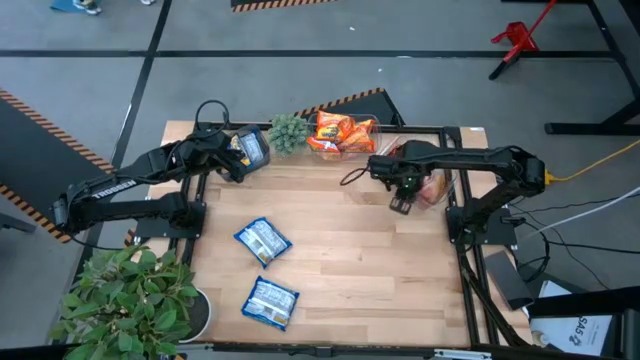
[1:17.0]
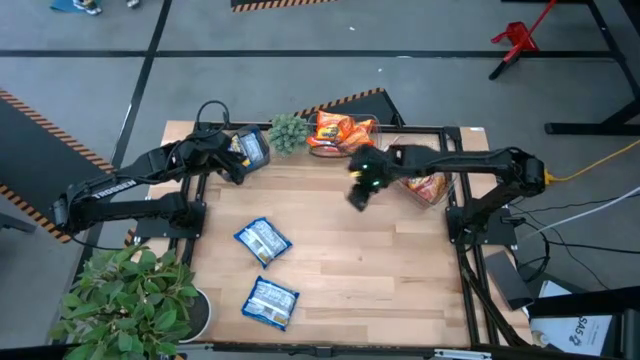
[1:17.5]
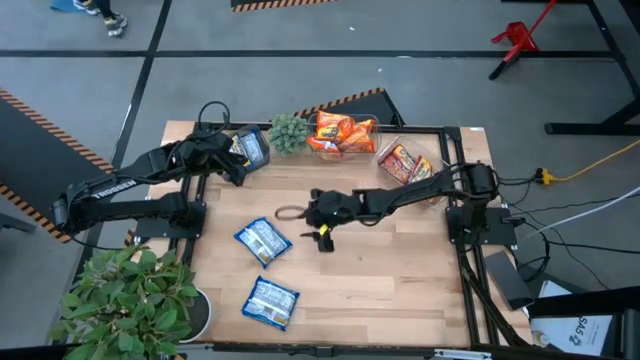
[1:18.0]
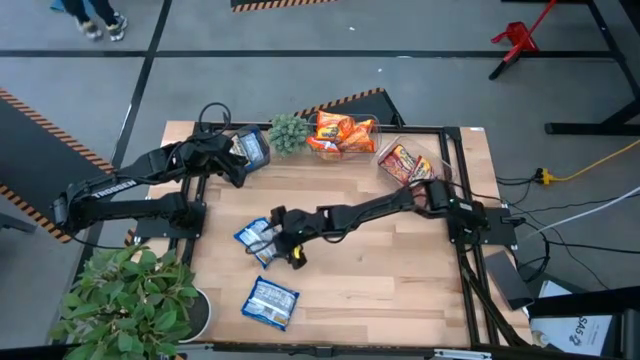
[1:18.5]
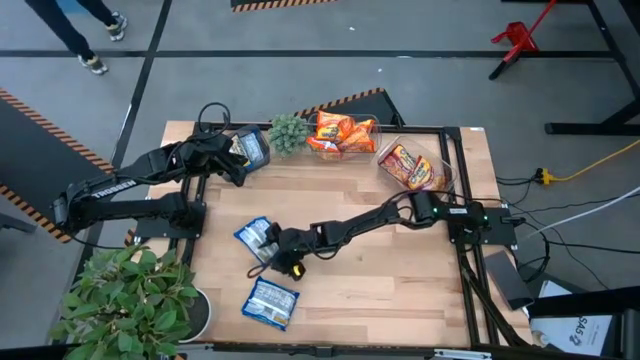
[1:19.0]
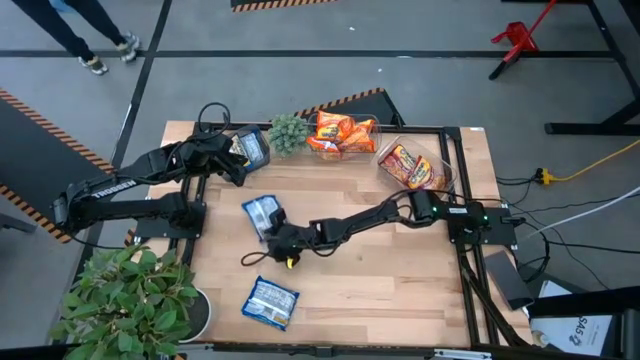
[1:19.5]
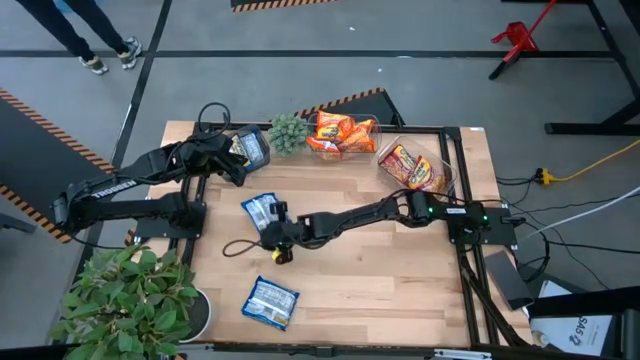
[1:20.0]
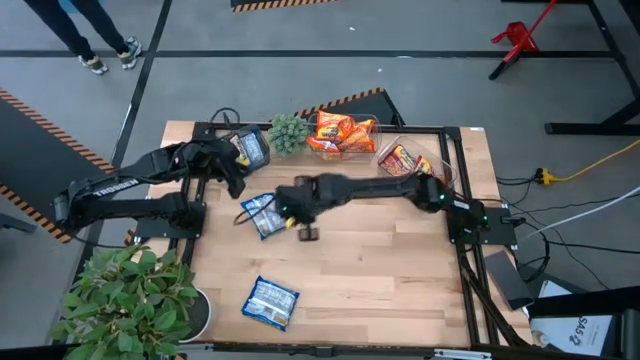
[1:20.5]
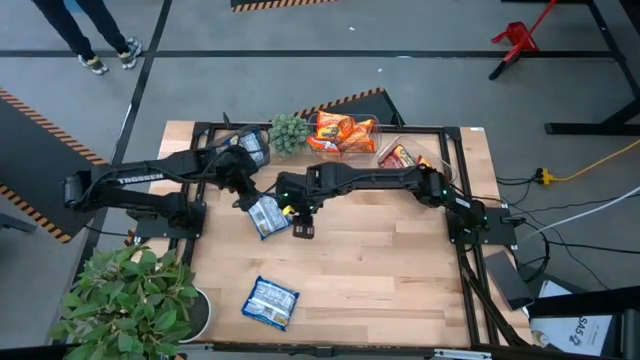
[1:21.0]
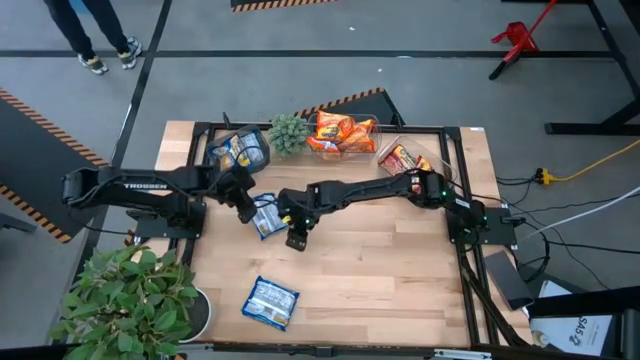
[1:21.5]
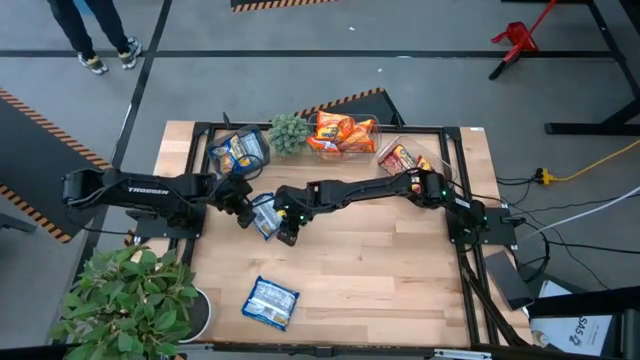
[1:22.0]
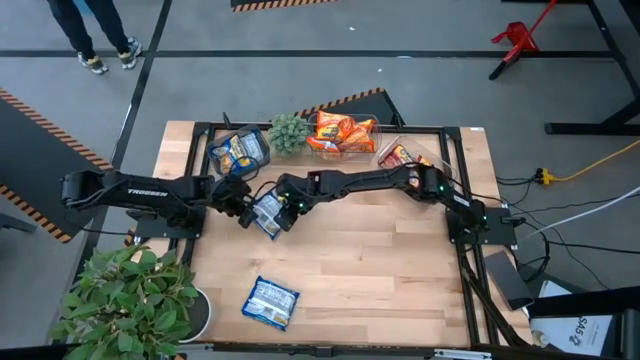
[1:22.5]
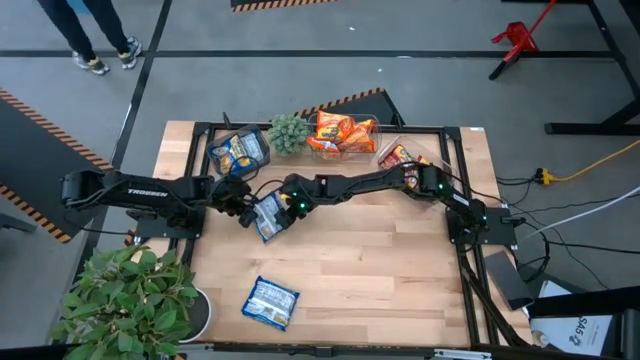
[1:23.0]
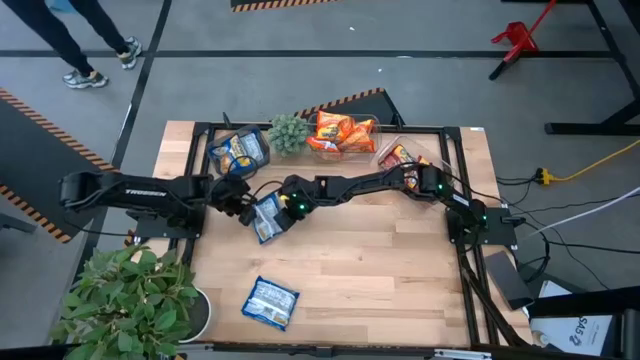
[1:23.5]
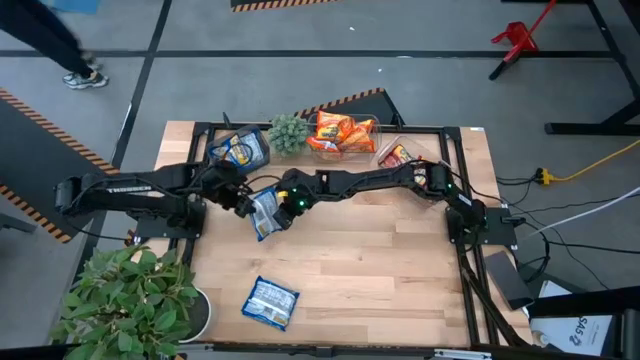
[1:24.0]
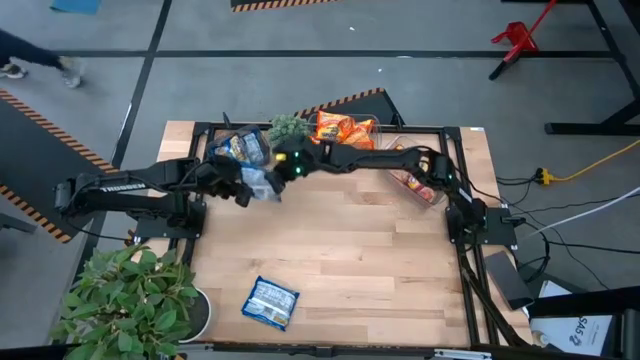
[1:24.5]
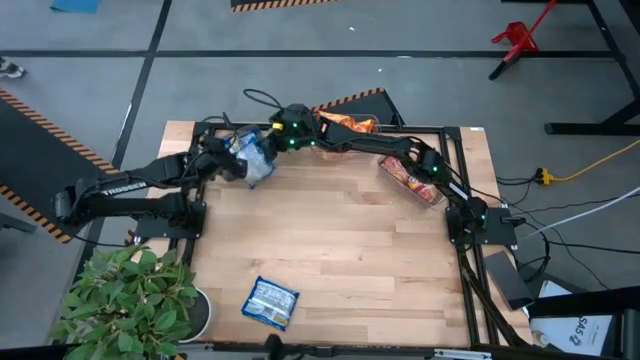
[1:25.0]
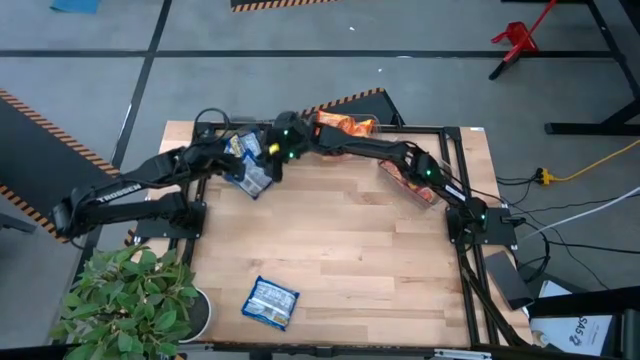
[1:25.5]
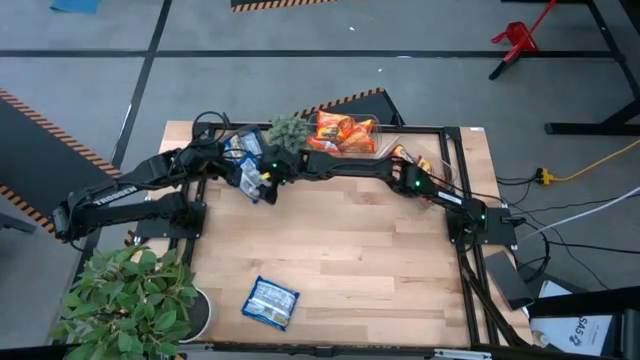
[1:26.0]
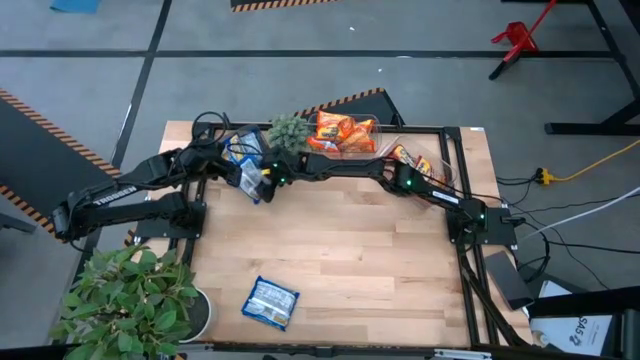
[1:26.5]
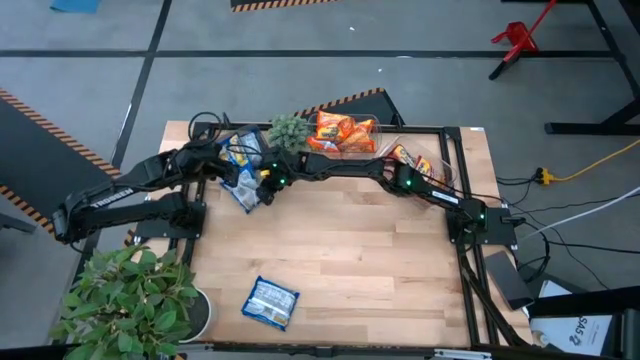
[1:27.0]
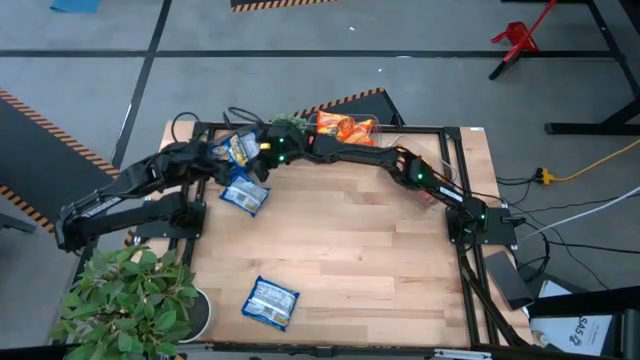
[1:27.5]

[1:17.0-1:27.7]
Task: Sort Maruchan noodles
Put the blue noodle pack into the black bin

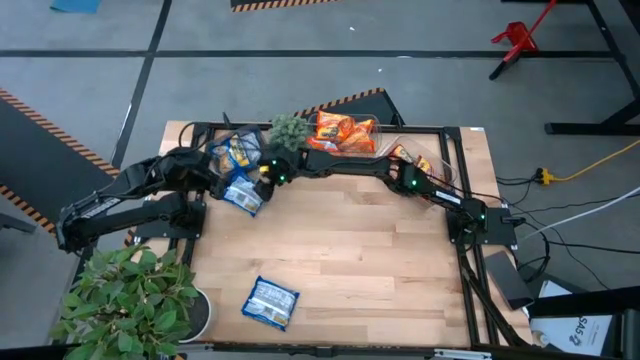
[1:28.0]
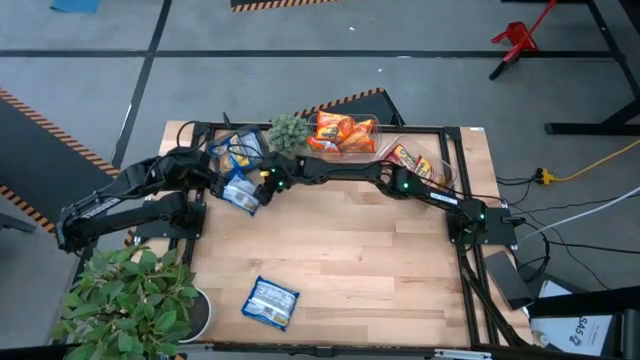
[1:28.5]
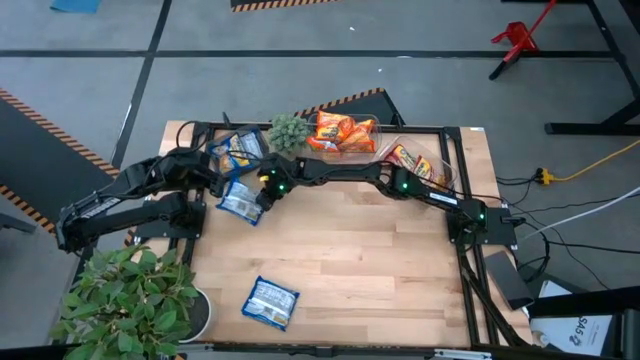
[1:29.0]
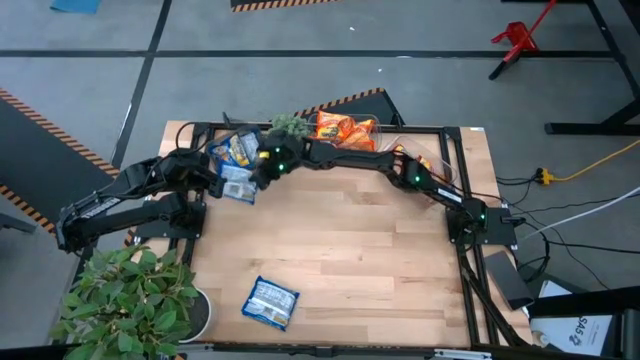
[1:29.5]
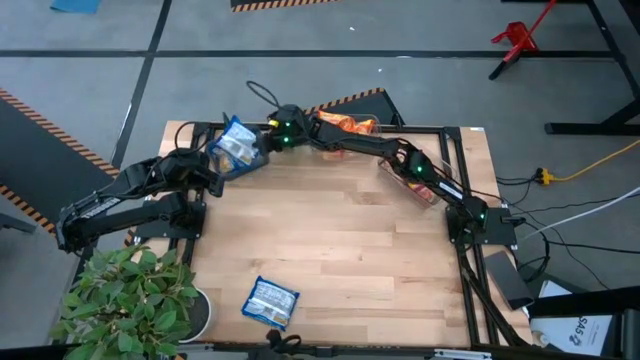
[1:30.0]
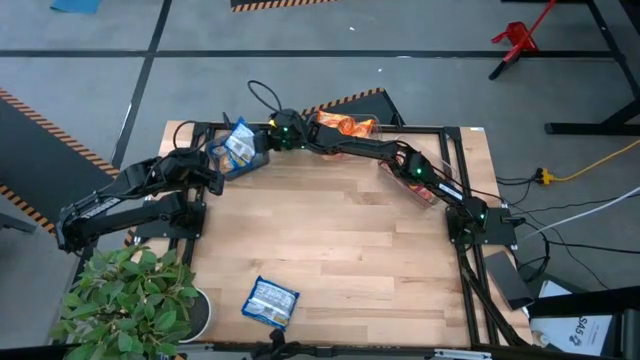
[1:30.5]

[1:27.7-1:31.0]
Put the blue noodle pack into the black bin

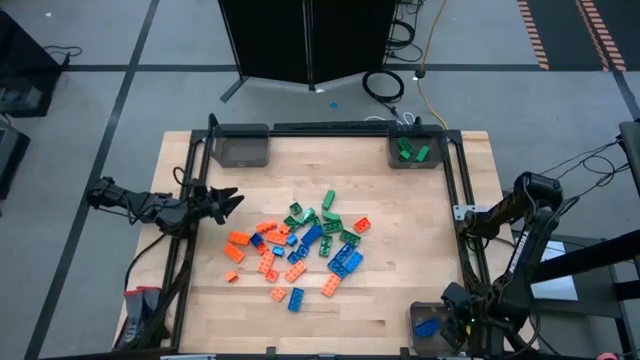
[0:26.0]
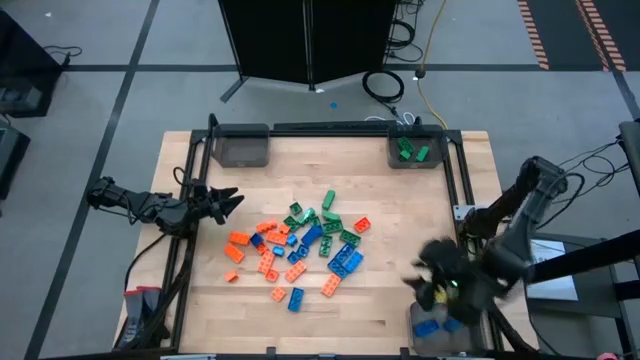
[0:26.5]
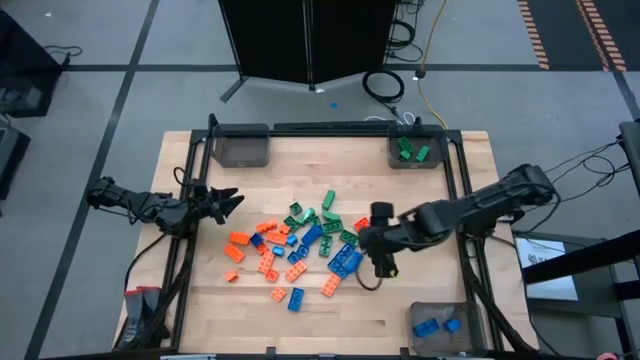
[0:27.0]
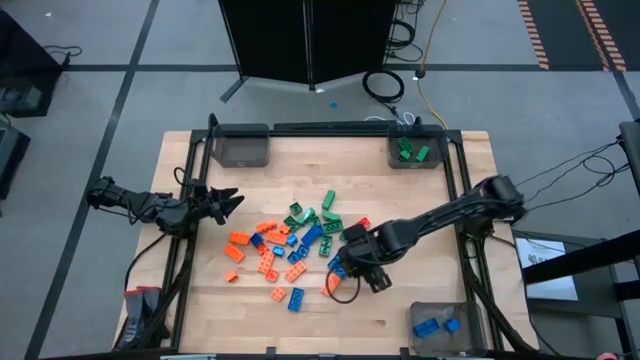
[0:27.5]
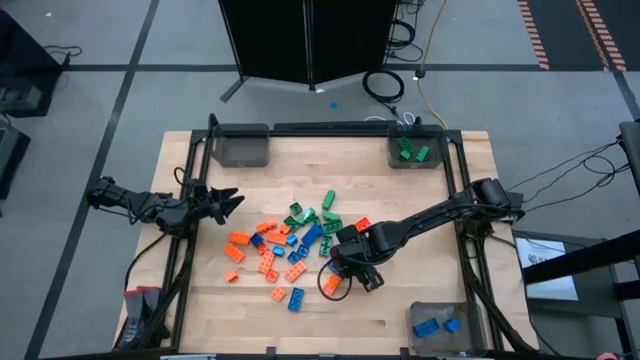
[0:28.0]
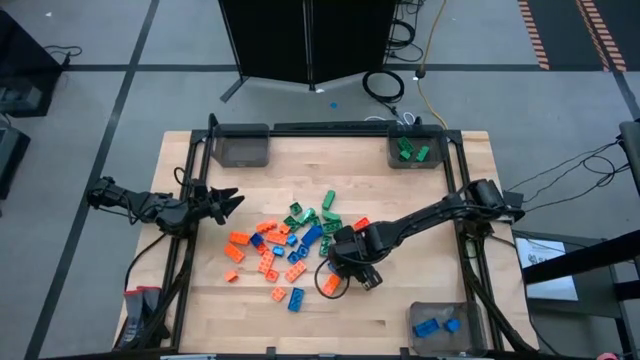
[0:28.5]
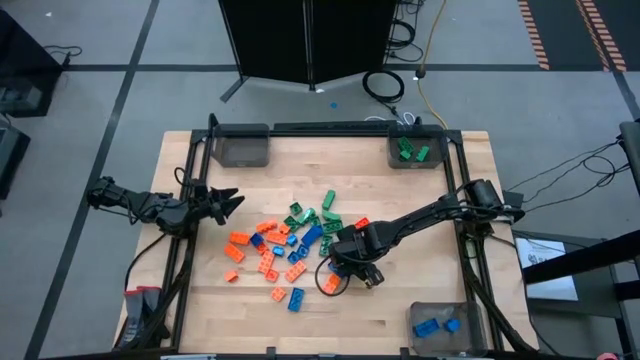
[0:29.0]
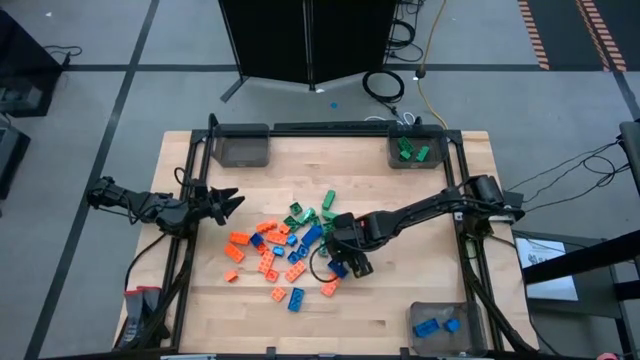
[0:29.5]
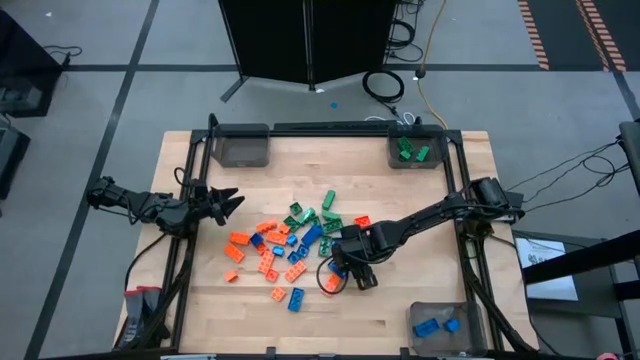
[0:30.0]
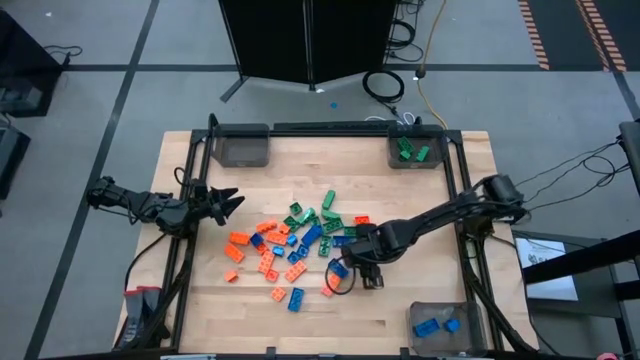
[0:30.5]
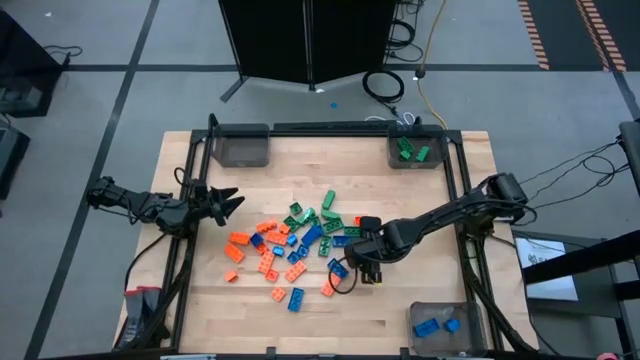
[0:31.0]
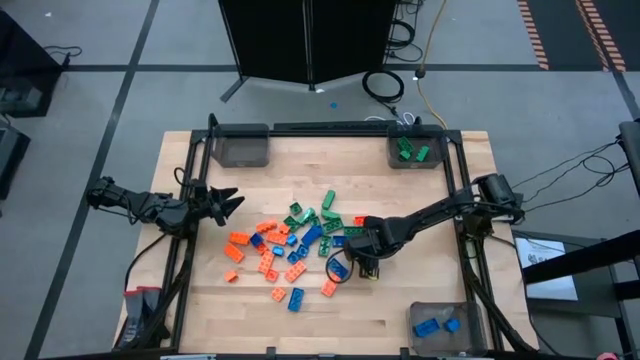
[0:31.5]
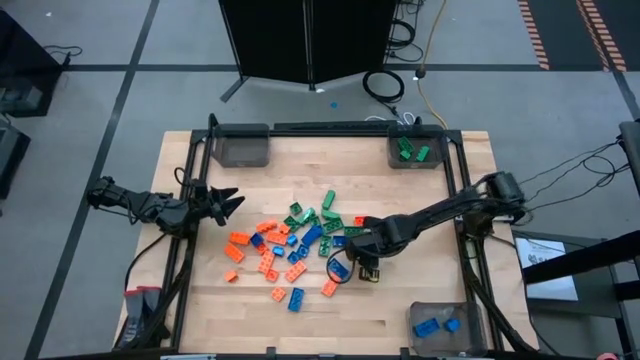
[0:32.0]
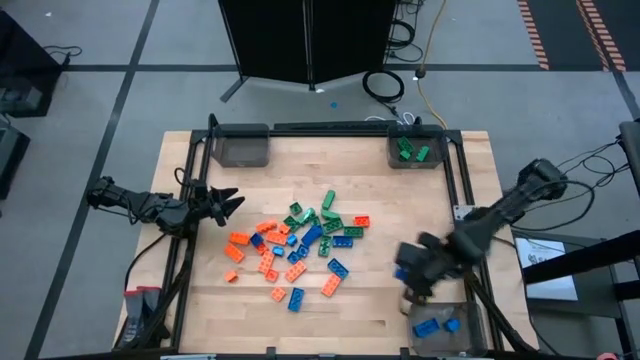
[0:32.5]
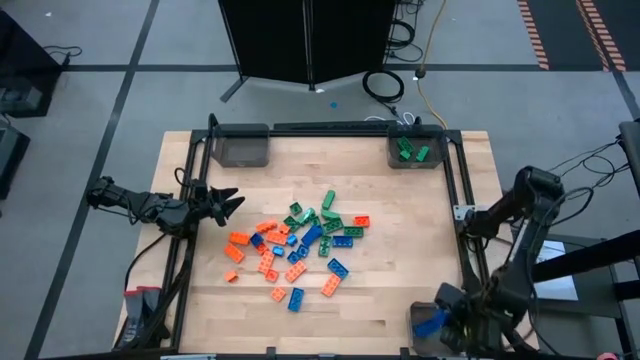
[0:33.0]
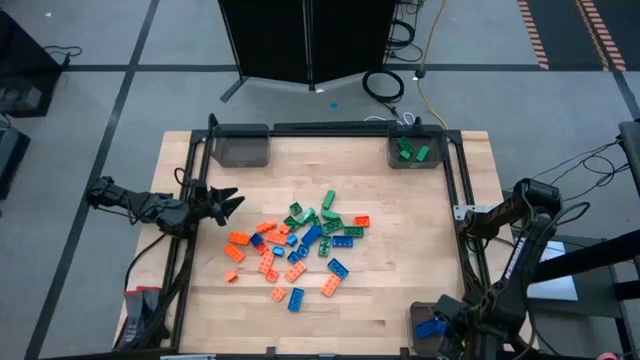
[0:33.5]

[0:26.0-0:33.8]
Task: Sort blocks
Put the blue game piece into the bottom black bin
